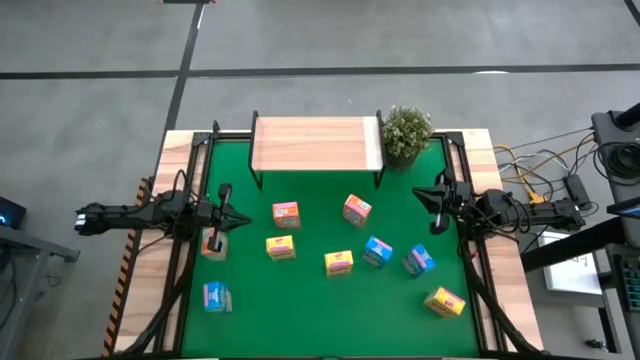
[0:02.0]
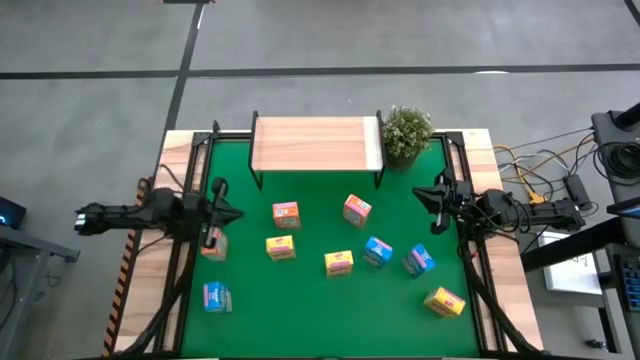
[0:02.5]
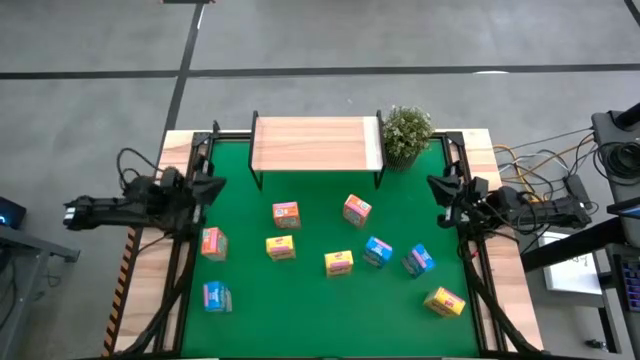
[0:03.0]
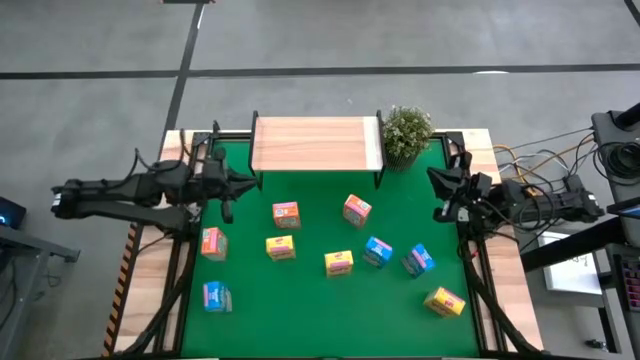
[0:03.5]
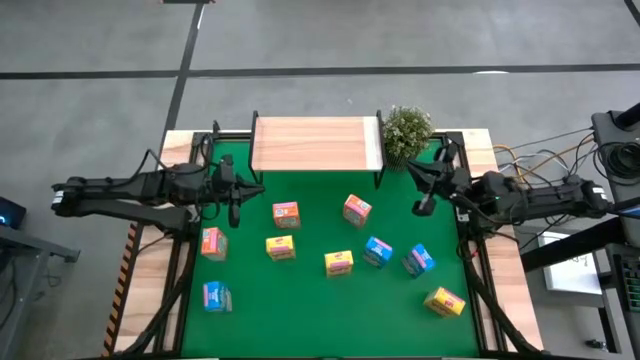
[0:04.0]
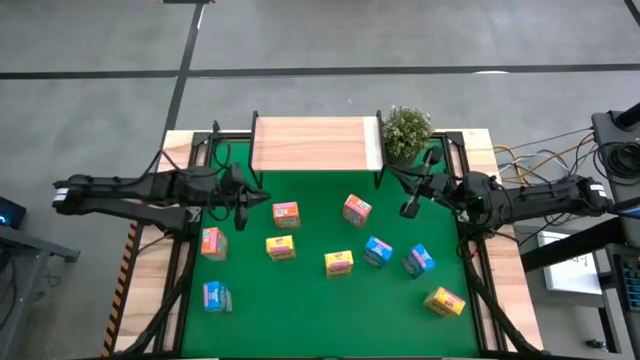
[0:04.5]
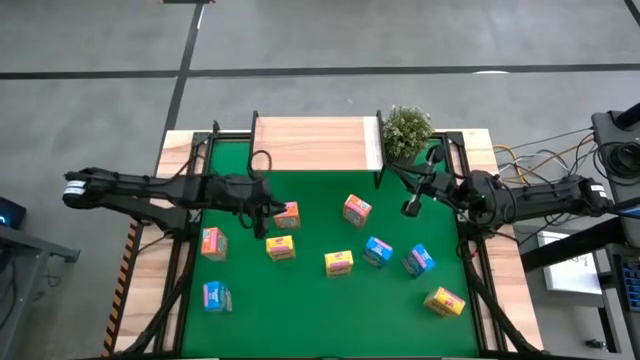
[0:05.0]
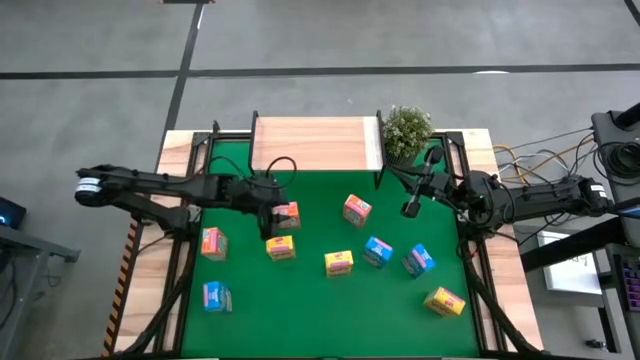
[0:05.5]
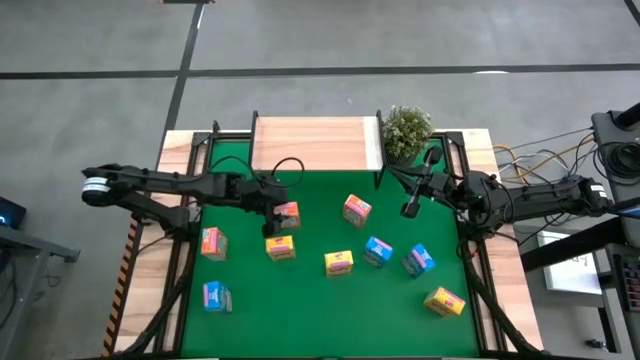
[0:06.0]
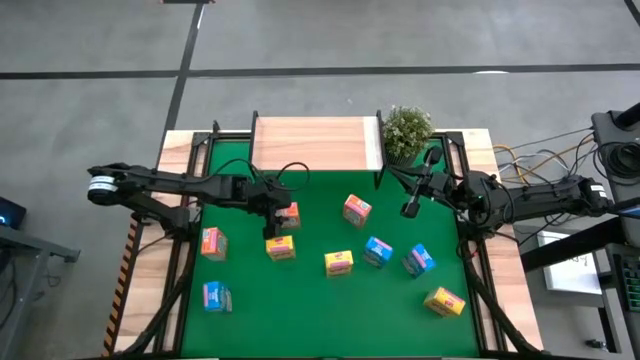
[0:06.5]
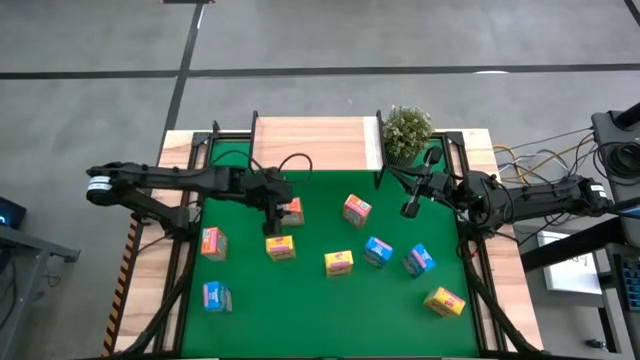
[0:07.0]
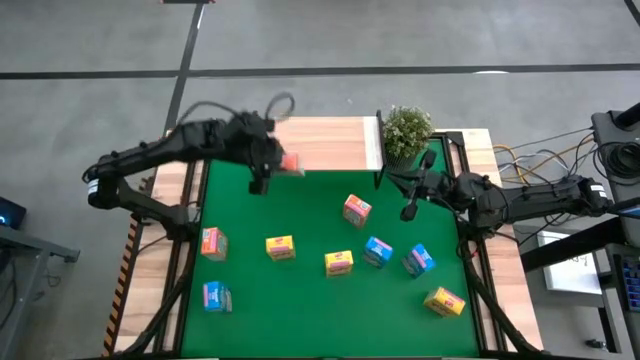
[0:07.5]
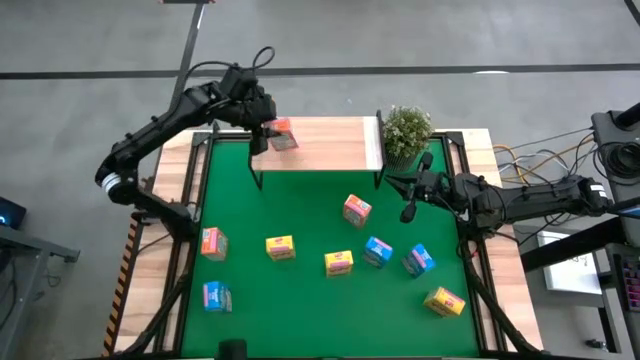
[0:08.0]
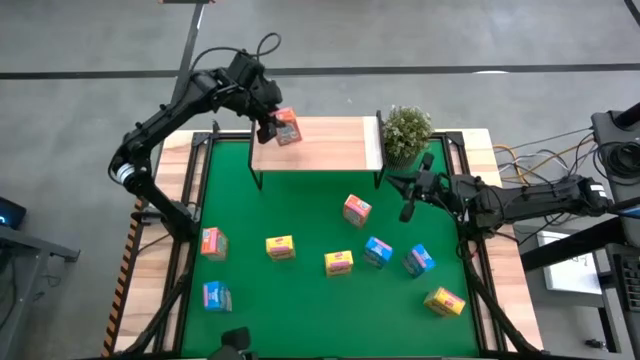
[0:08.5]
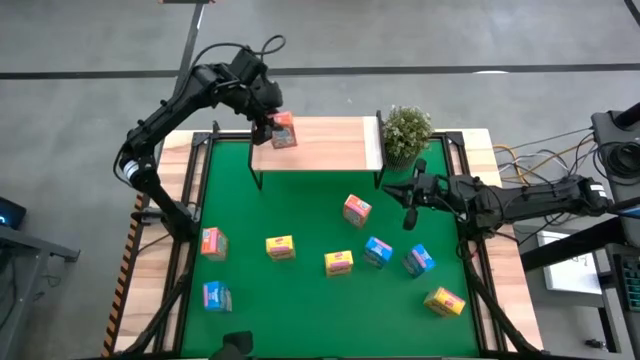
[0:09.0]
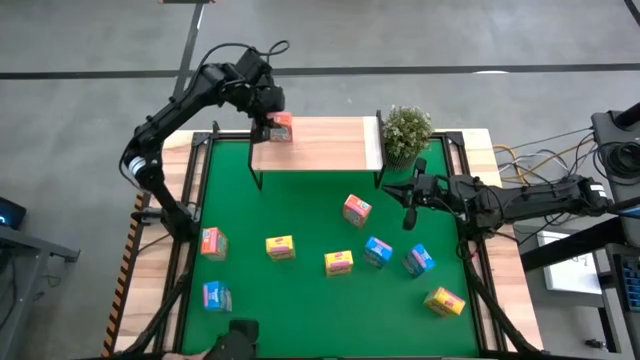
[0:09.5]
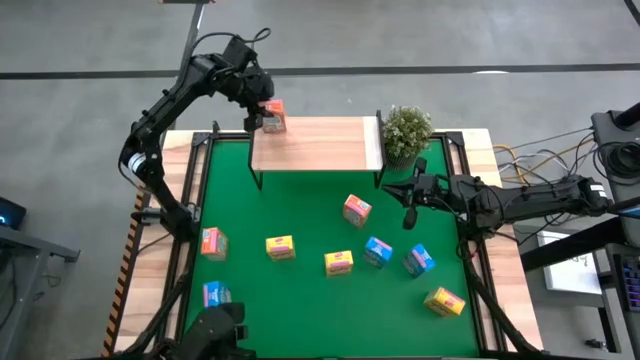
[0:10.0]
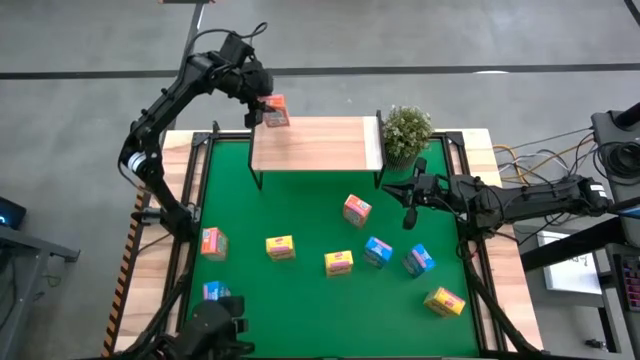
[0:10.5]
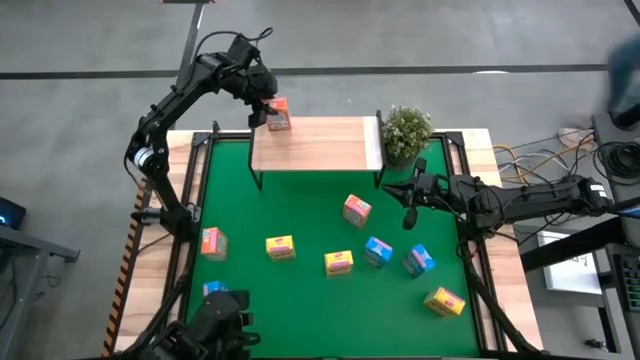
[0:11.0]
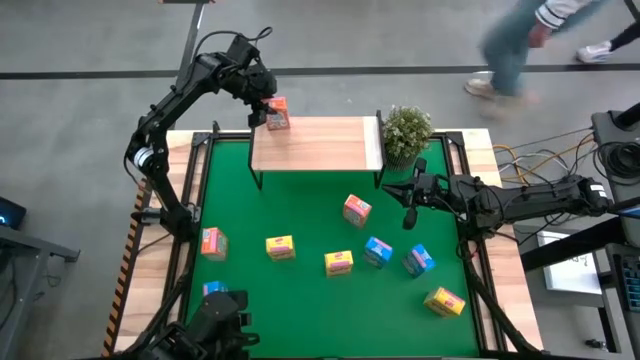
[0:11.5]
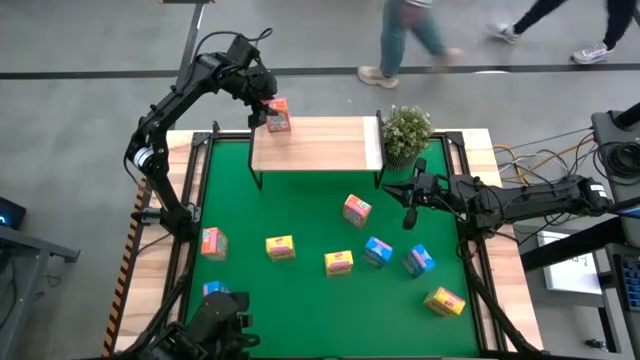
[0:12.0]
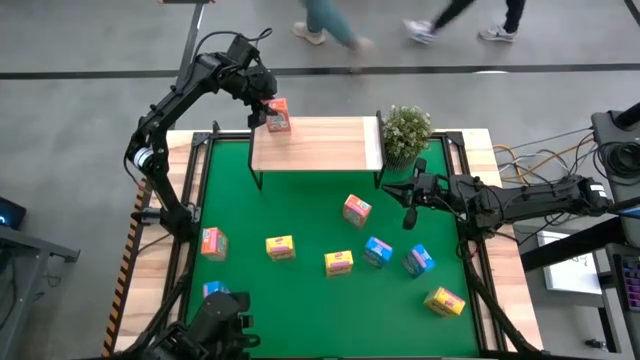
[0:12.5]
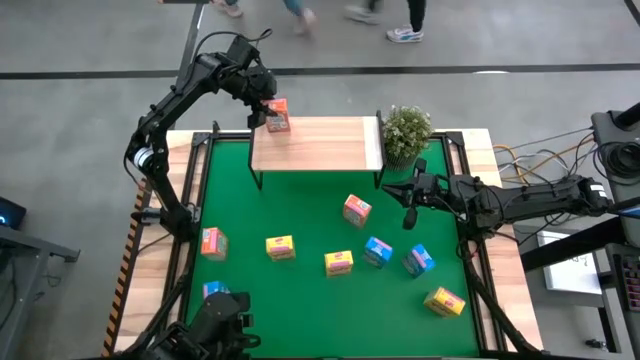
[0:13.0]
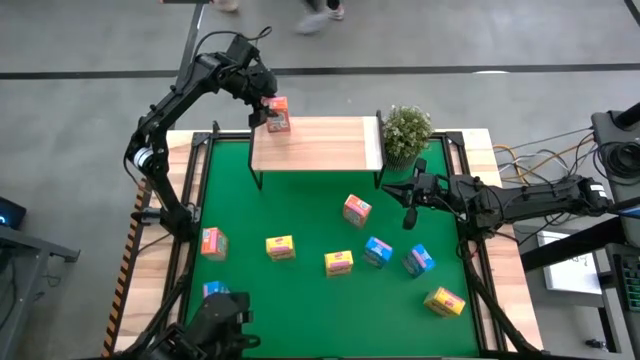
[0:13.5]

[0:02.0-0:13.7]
Task: Stack cereal on shelf
Put the middle orange cereal box on the shelf

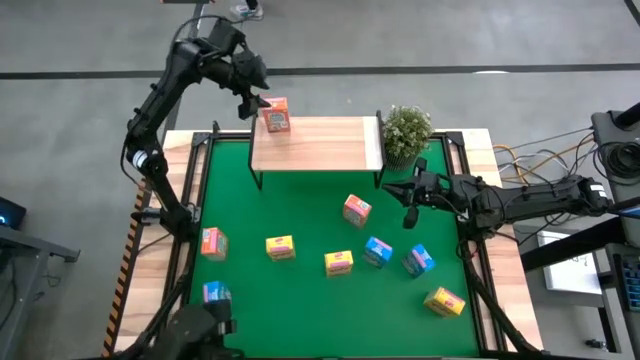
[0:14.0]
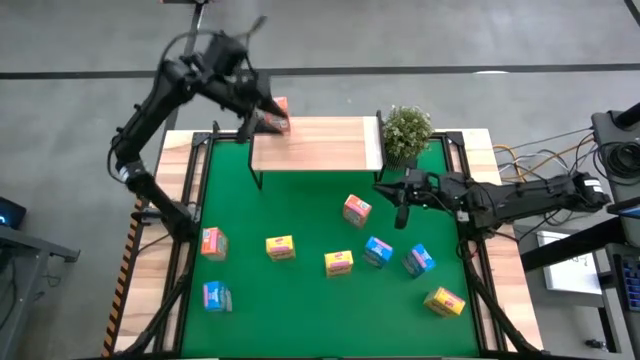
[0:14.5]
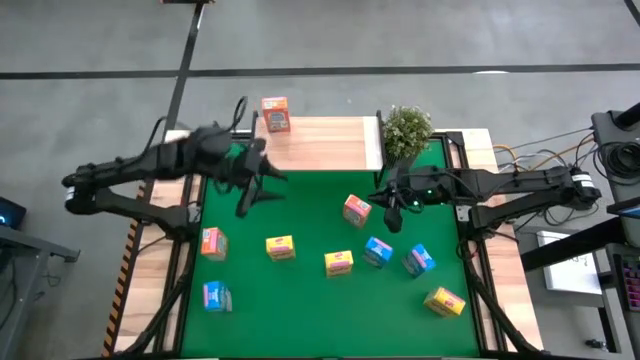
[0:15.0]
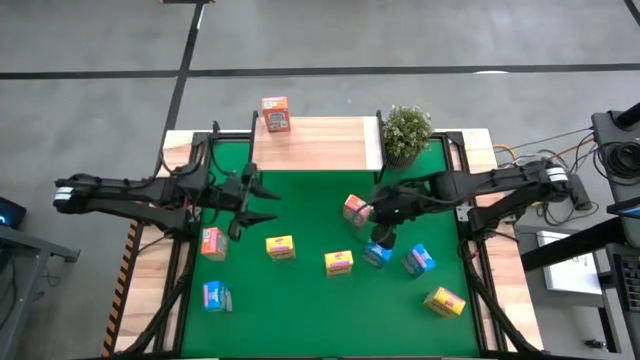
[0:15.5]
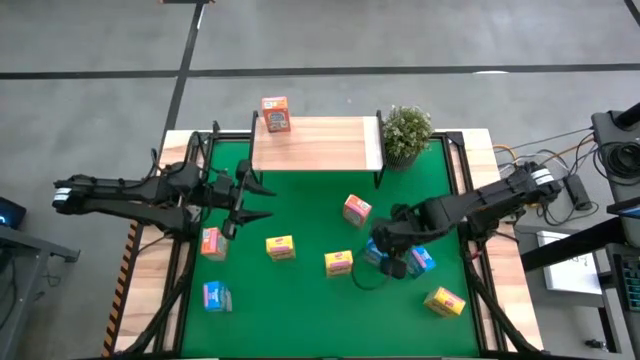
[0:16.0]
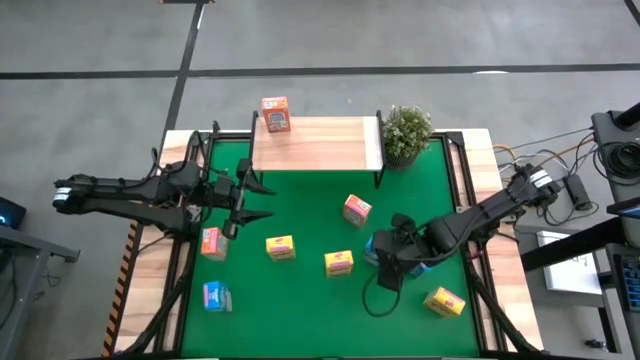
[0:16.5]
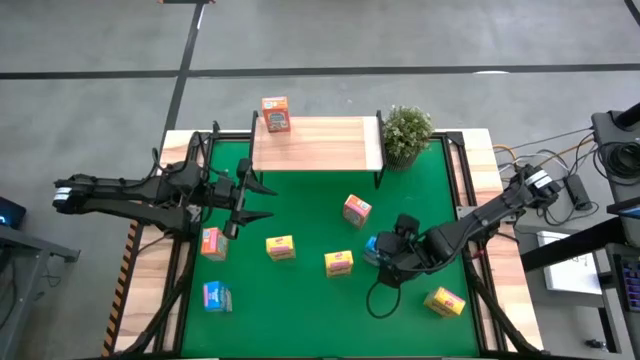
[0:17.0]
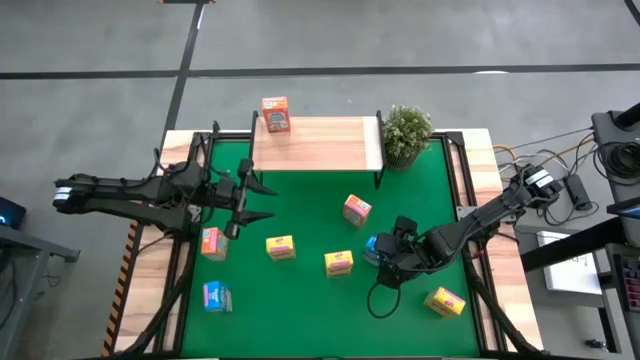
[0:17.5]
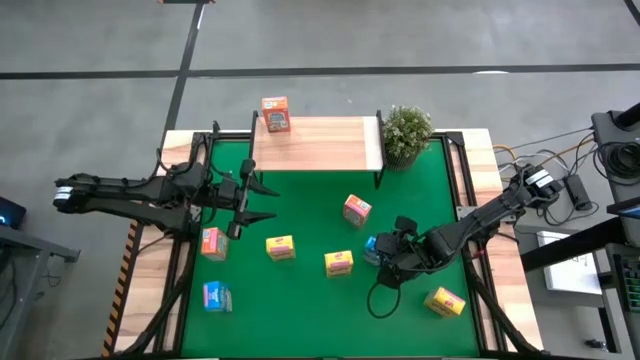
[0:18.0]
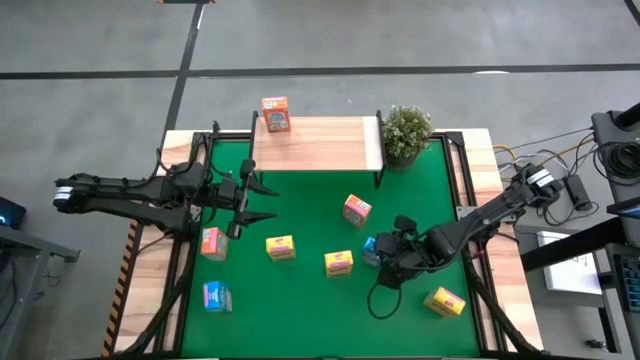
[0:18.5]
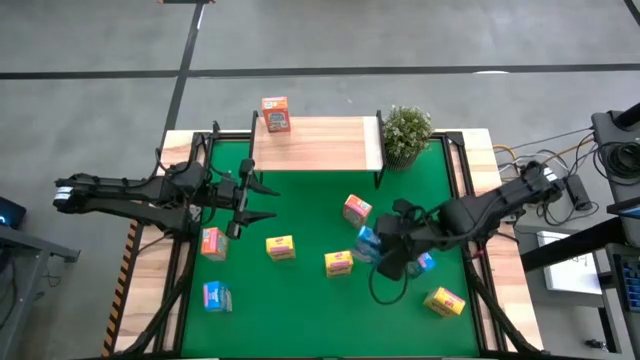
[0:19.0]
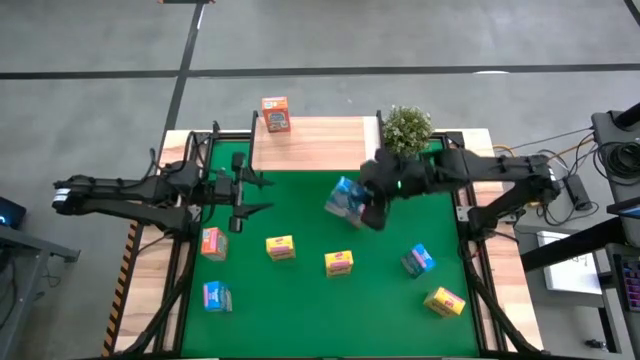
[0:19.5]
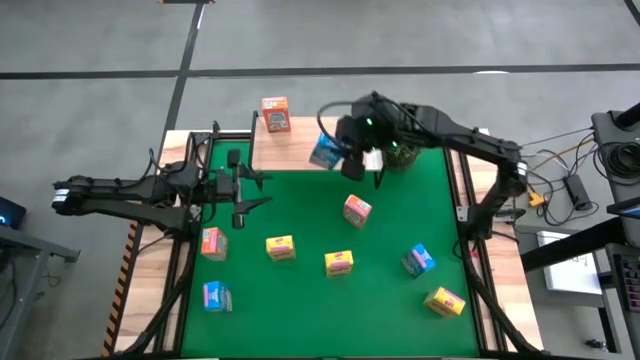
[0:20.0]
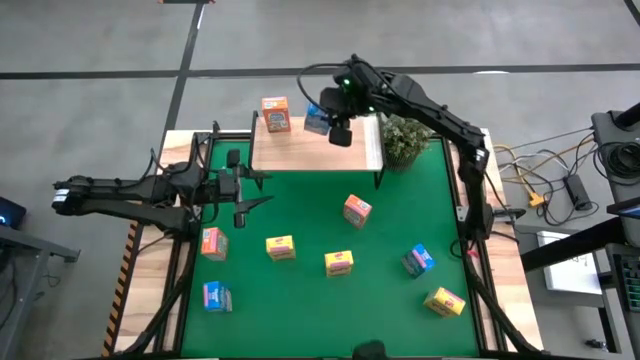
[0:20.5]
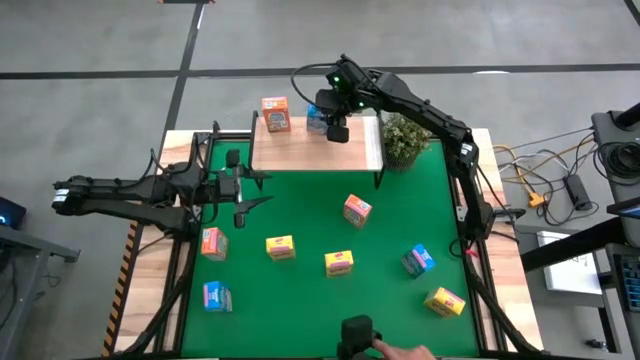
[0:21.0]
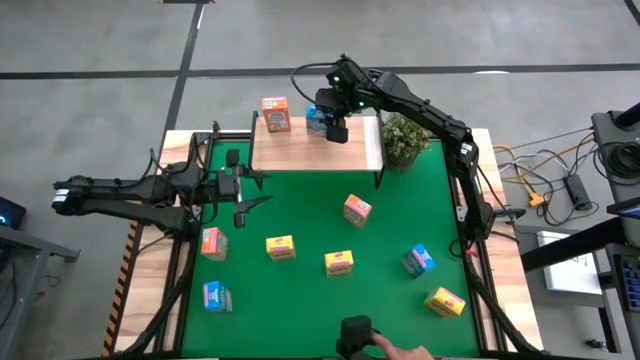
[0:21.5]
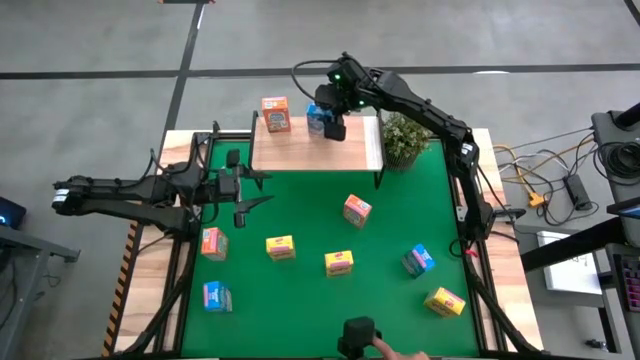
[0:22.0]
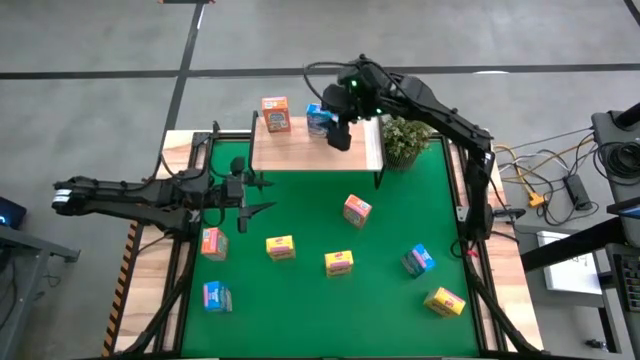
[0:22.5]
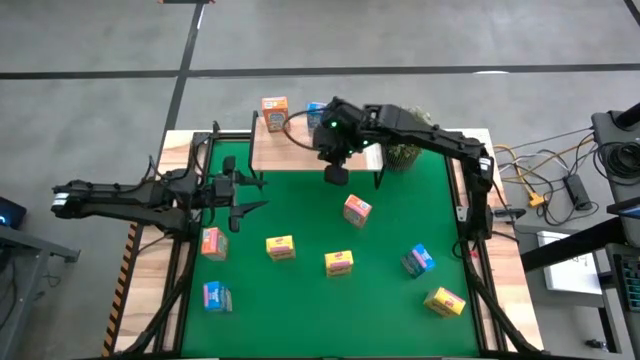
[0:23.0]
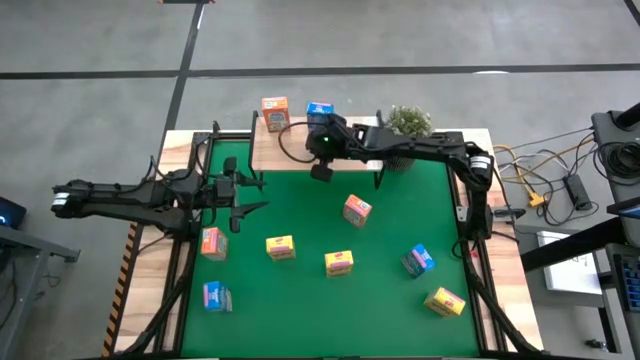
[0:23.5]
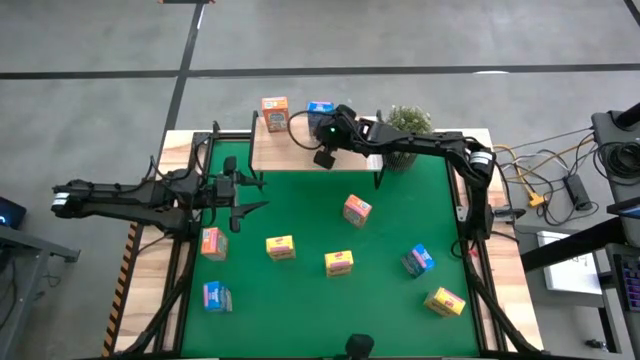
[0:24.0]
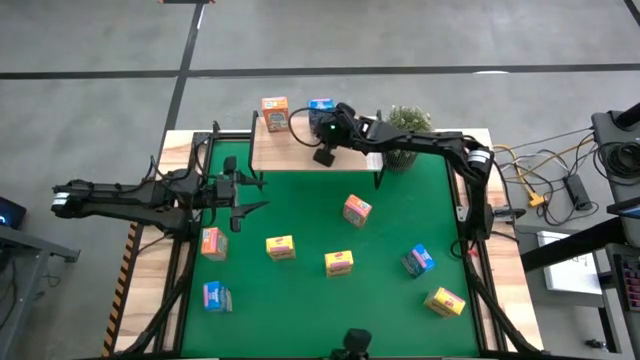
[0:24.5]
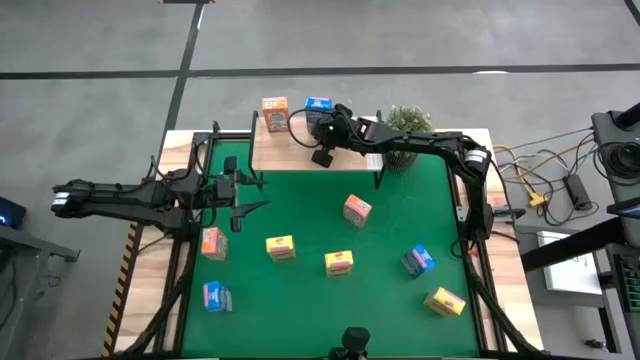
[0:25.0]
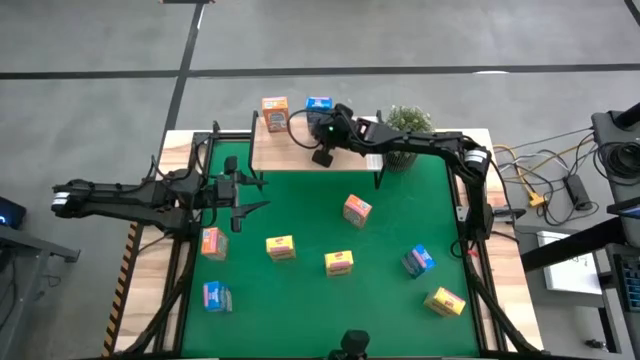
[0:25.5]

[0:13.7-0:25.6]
Put the middle blue cereal box on the shelf
